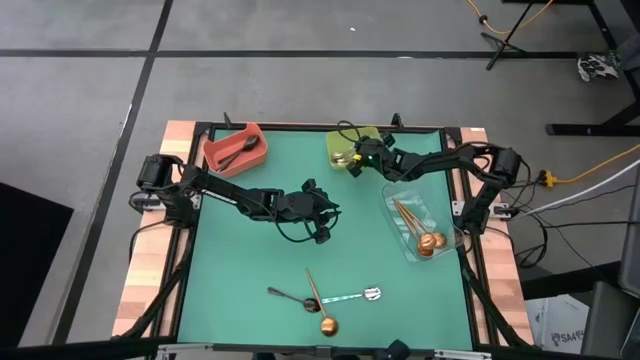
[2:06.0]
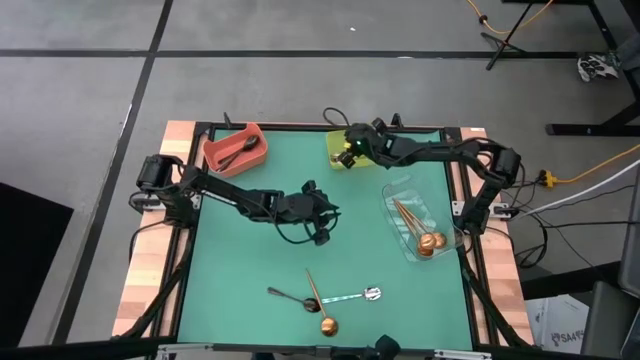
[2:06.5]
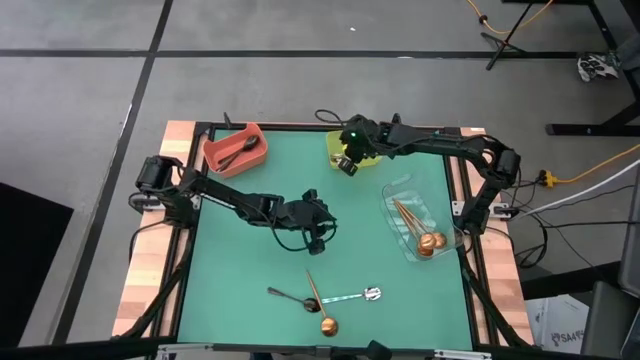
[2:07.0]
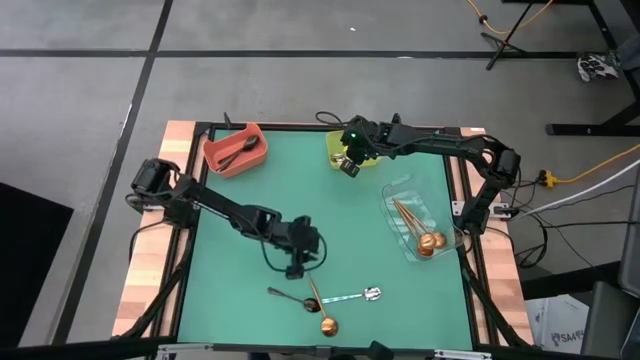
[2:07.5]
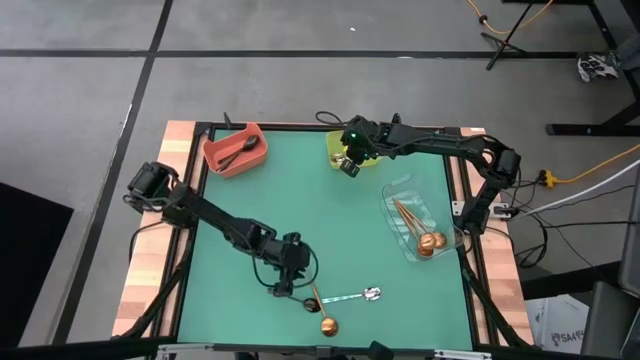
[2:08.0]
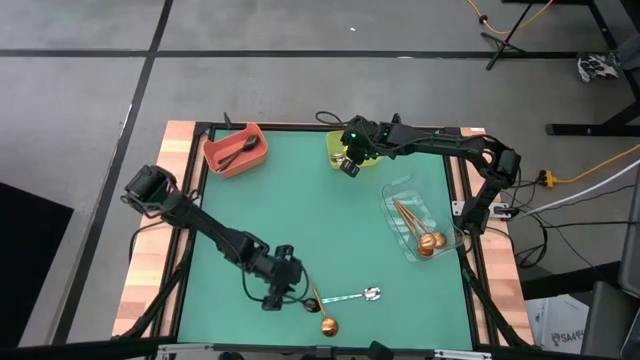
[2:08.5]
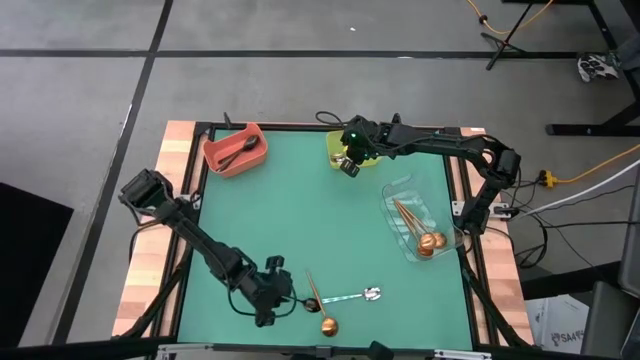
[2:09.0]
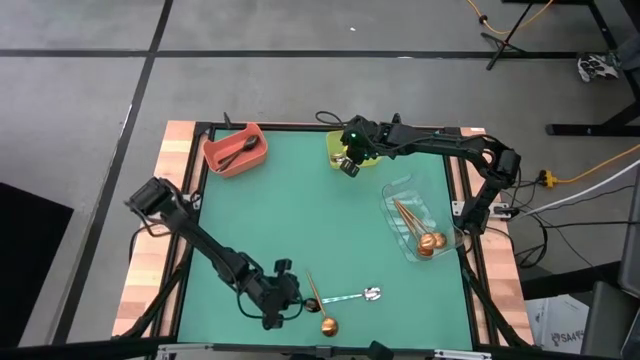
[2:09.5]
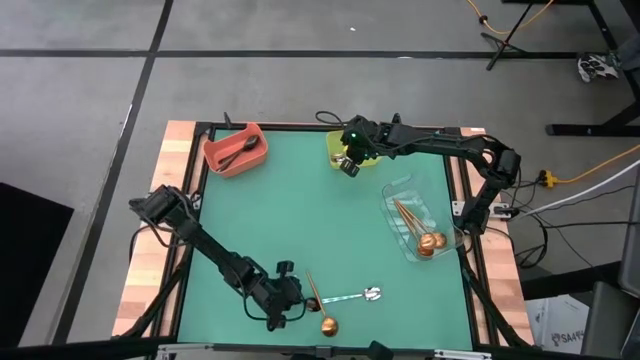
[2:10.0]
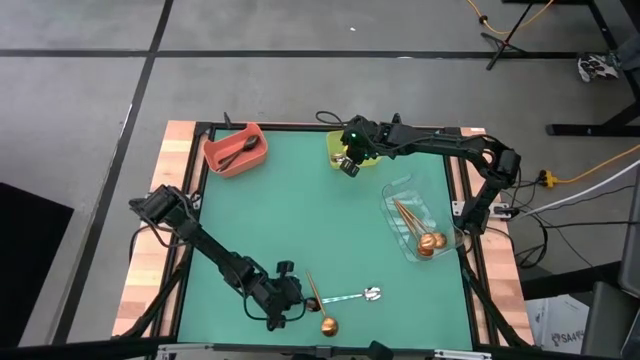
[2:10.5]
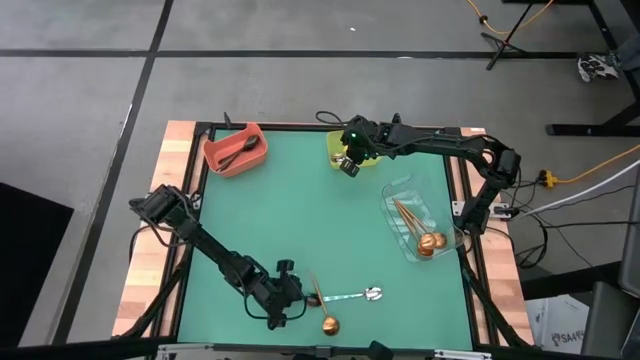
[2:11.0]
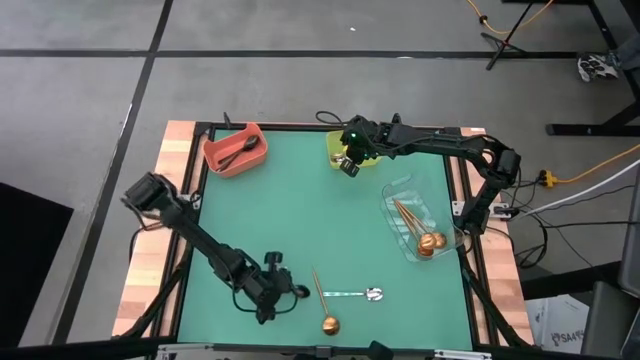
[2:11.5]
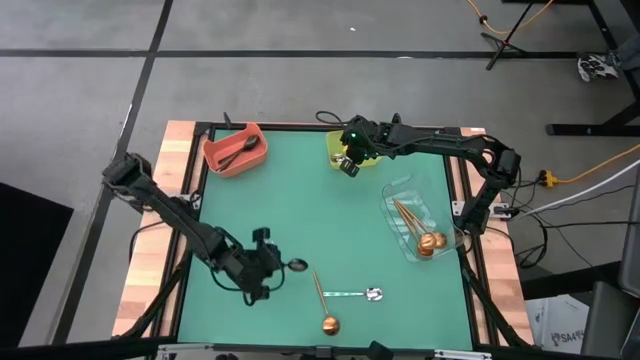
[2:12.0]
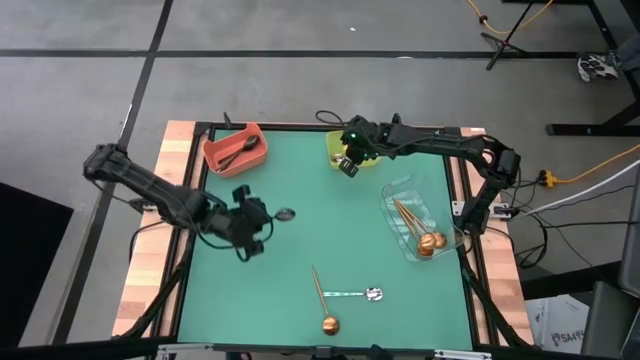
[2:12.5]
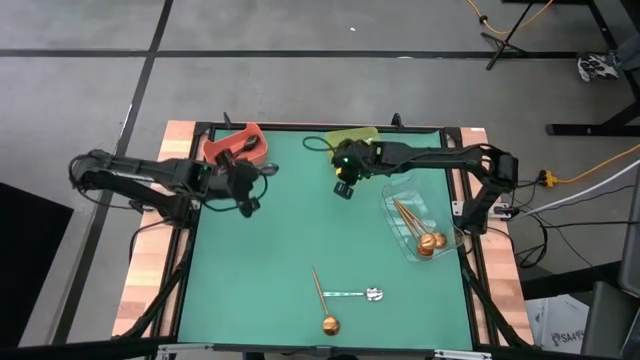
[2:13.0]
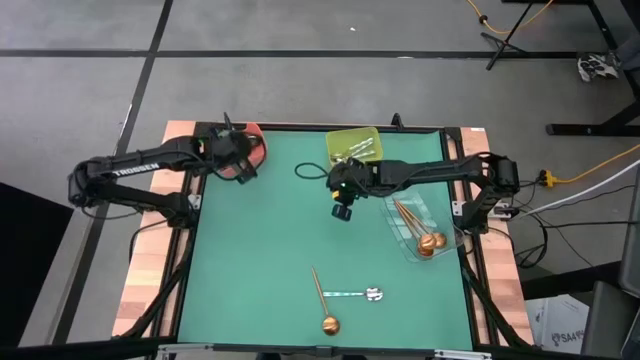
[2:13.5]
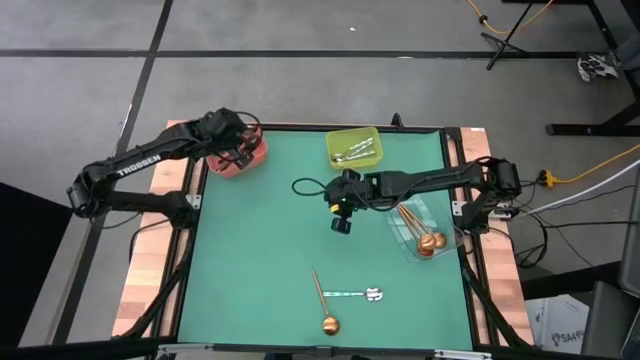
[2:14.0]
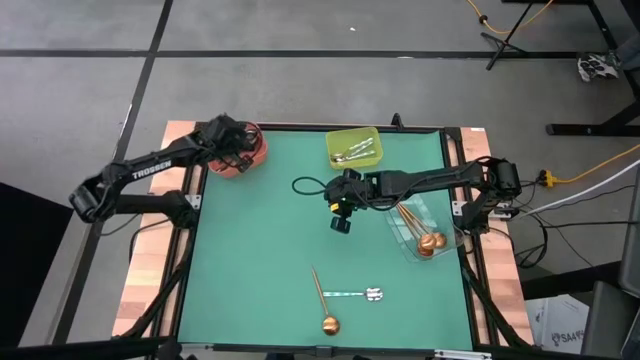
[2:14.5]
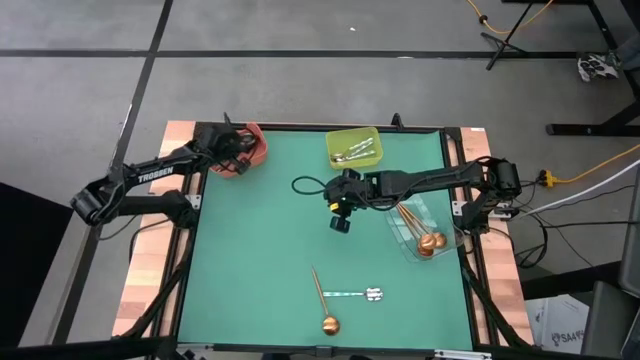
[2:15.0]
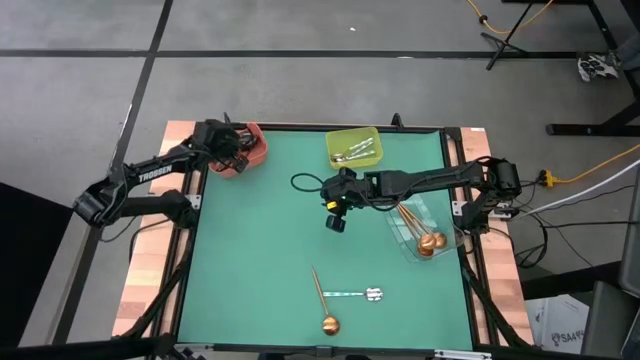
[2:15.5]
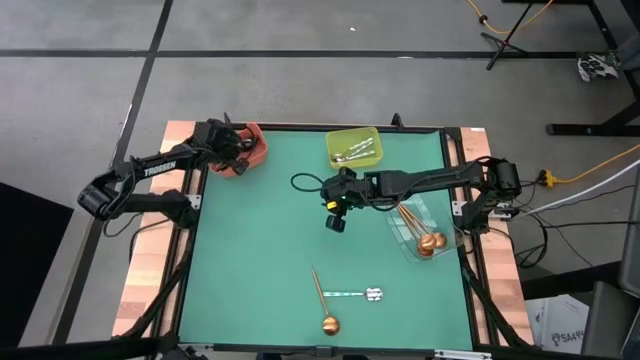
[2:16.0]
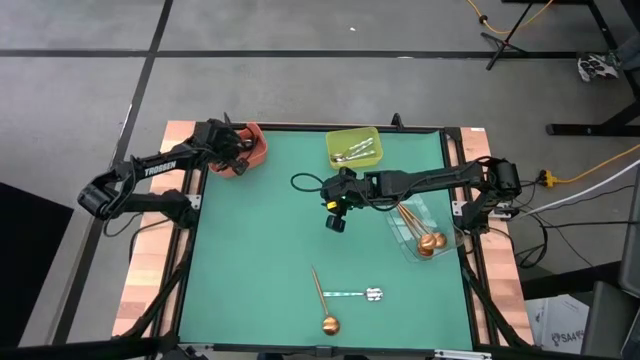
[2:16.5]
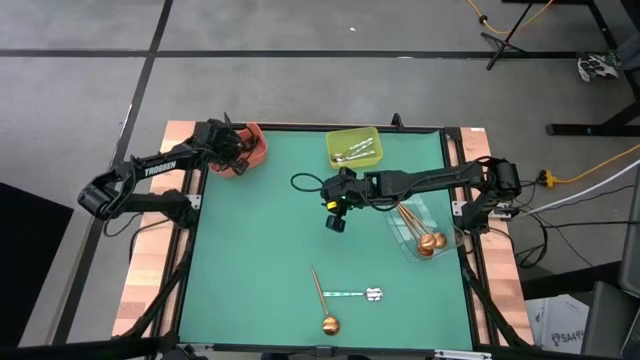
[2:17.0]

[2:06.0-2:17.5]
Task: Sort silverware by color (type)
Put the black spoon into the orange bin

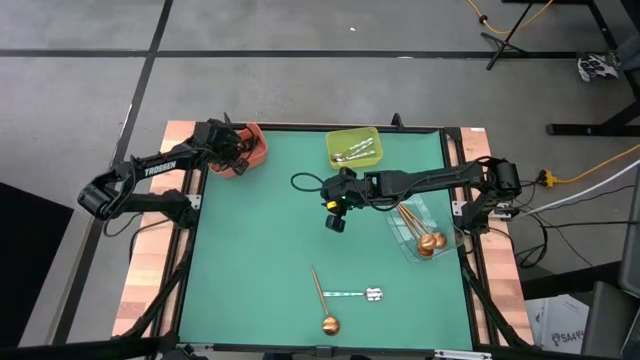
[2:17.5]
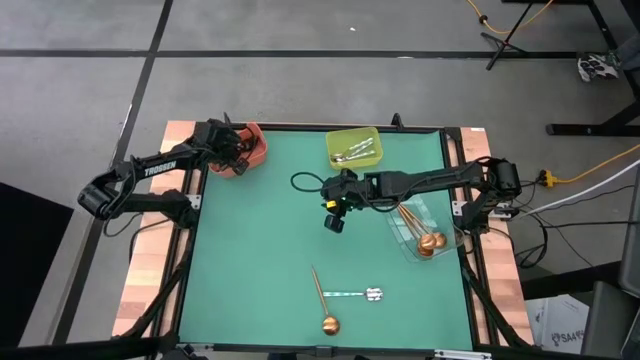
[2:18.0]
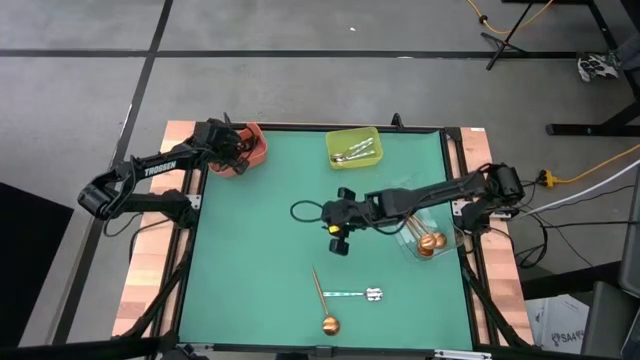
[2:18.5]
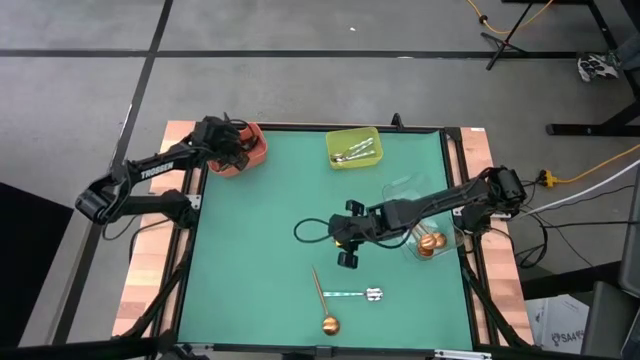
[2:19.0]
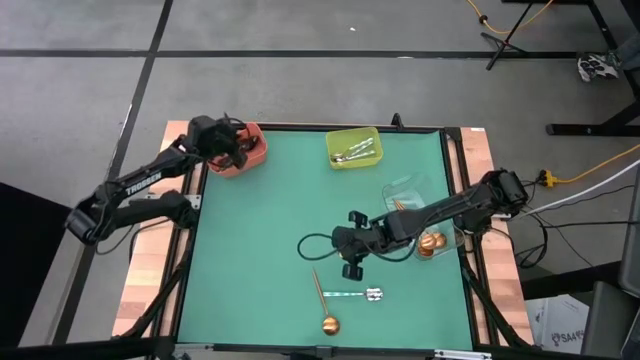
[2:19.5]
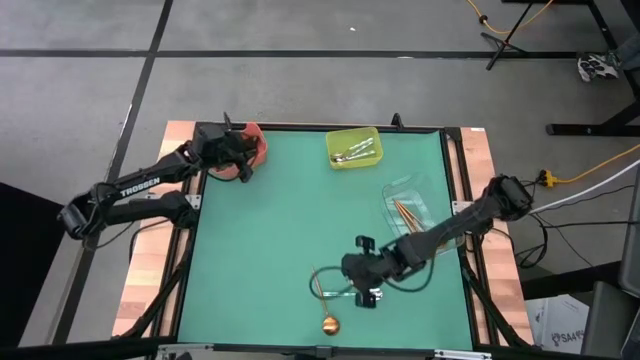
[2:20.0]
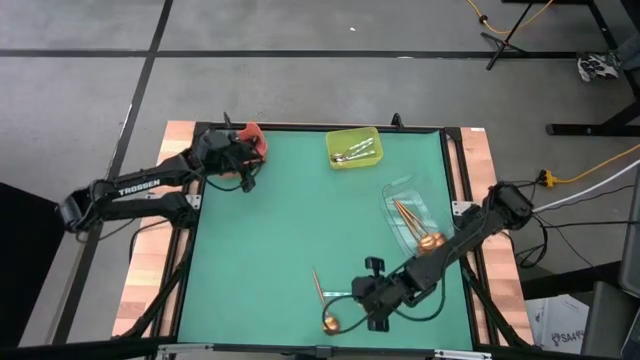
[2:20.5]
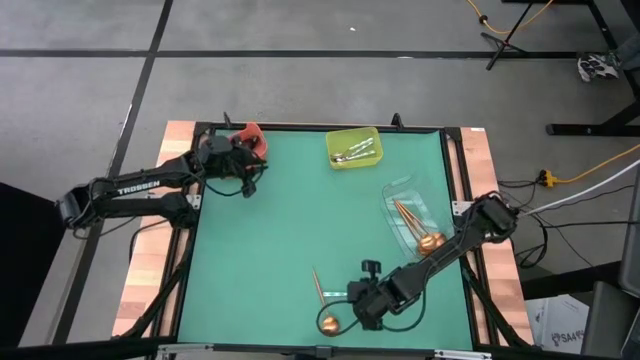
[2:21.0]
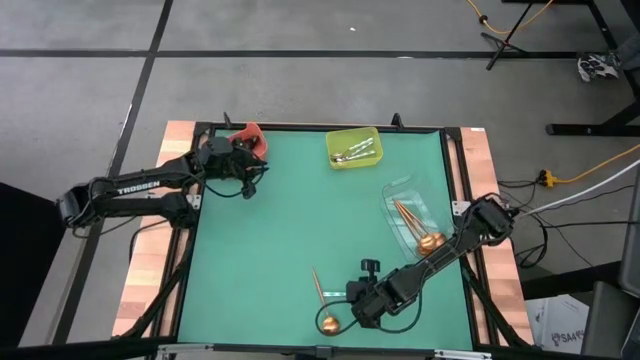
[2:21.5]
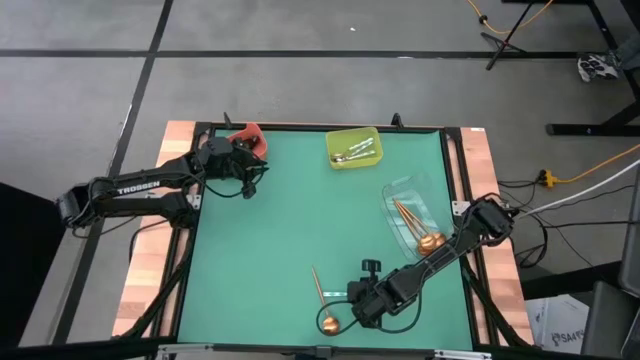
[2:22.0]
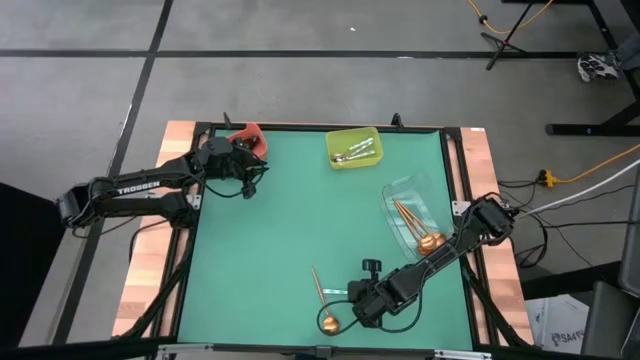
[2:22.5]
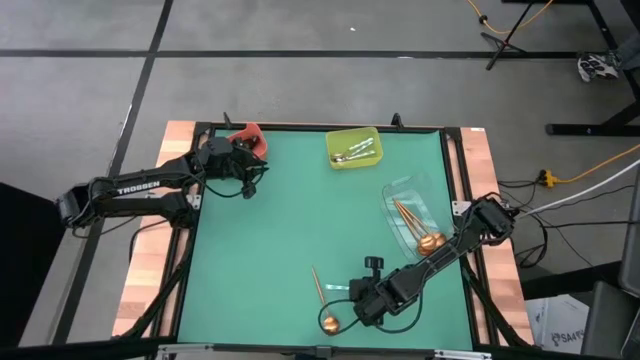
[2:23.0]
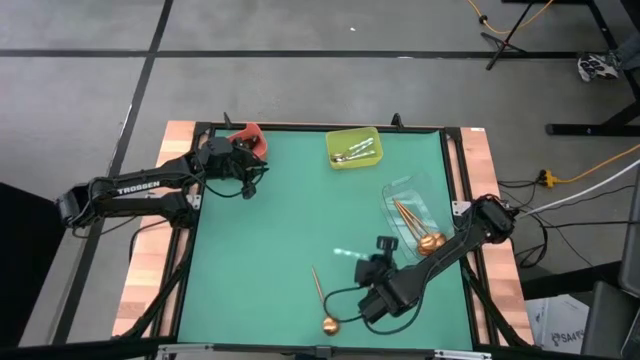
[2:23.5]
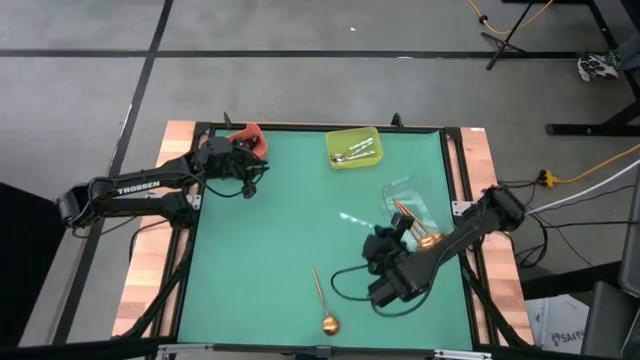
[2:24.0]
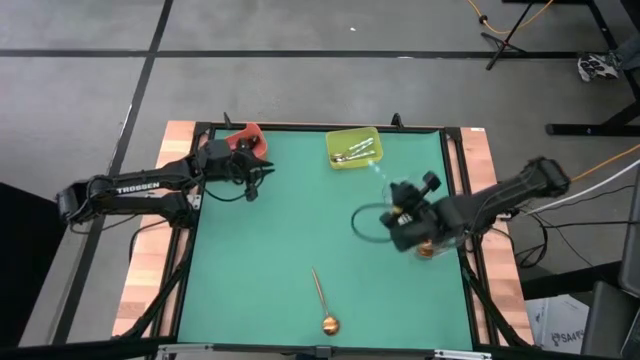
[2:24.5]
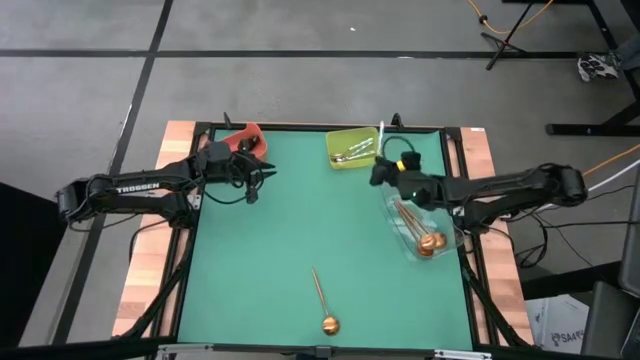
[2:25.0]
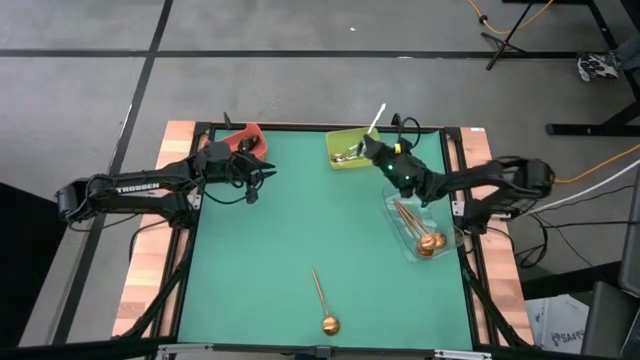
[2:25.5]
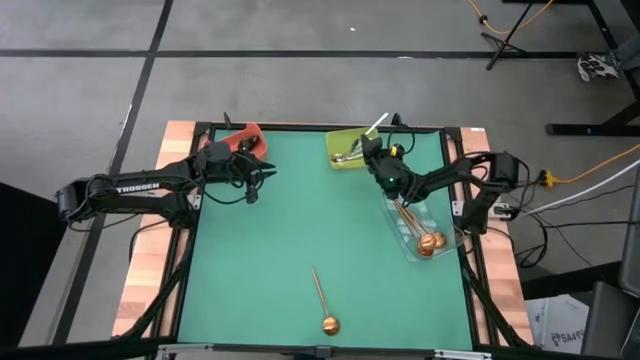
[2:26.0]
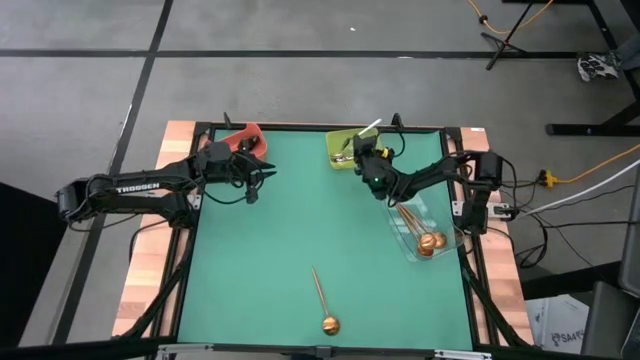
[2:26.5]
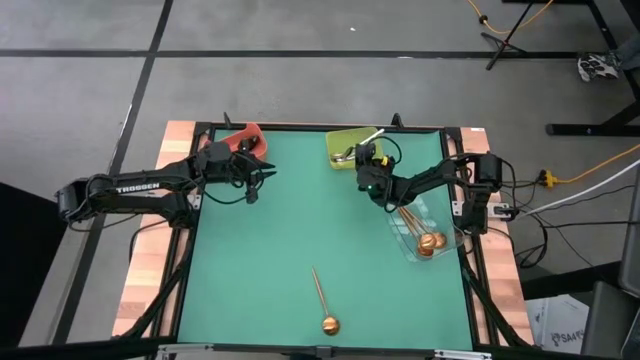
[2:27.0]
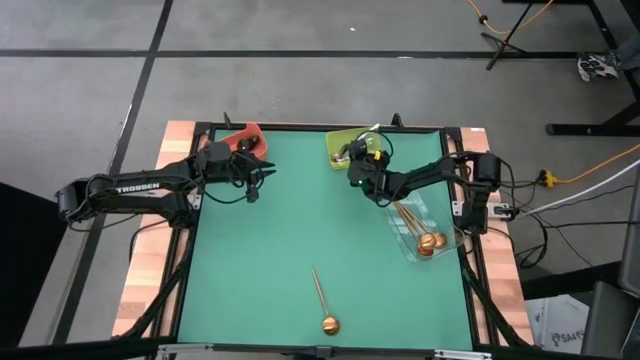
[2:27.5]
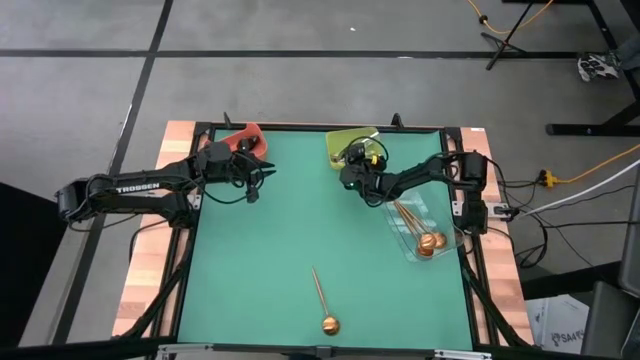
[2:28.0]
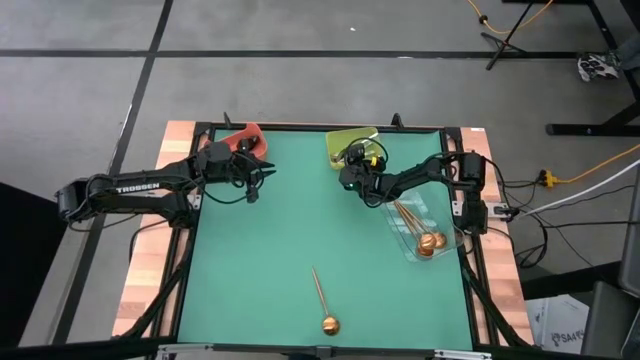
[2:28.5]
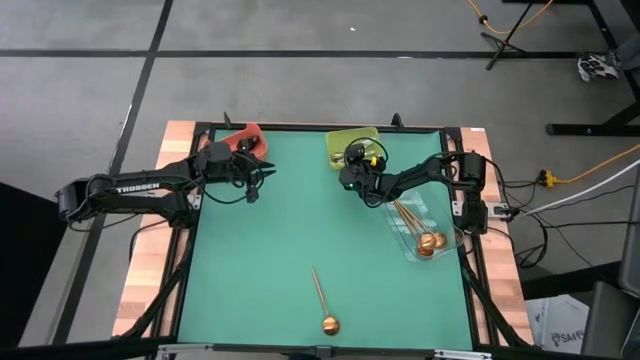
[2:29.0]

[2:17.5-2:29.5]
Put the white and green spoon into the yellow bin
